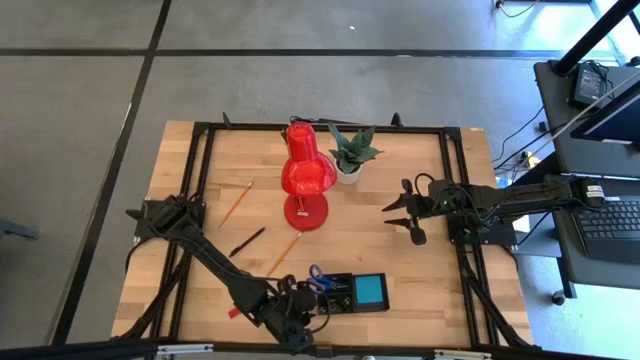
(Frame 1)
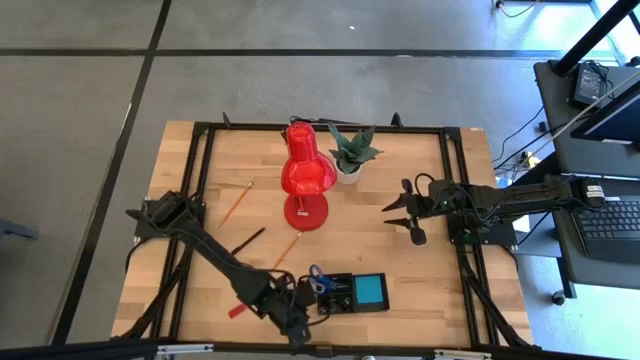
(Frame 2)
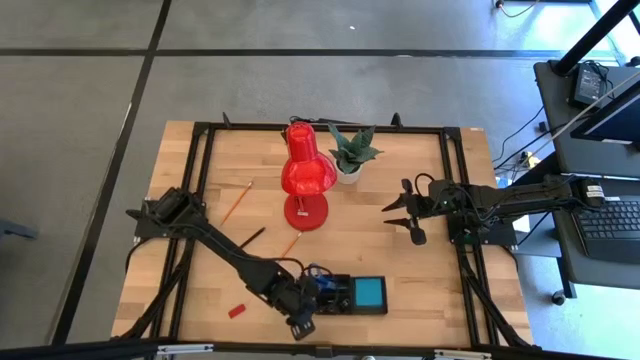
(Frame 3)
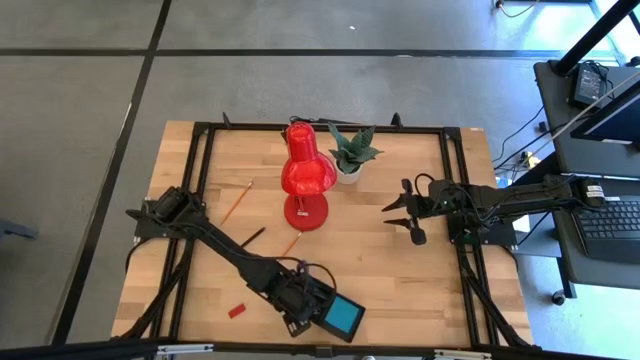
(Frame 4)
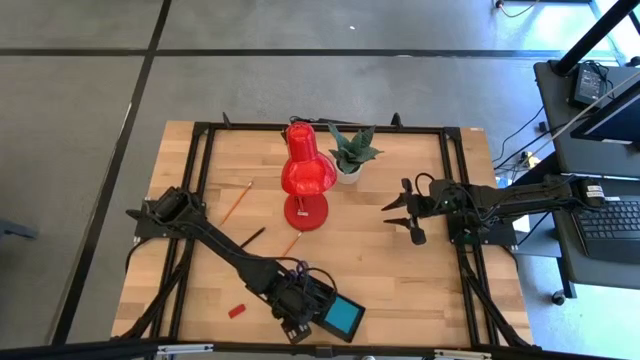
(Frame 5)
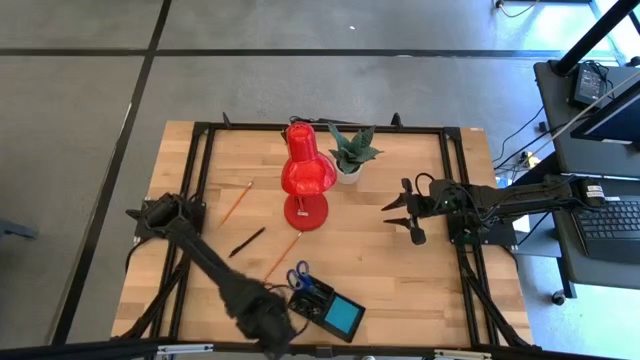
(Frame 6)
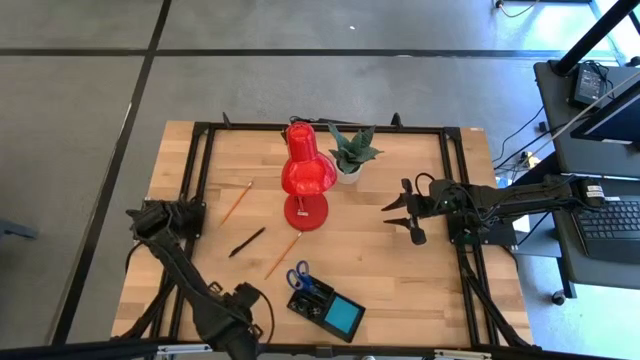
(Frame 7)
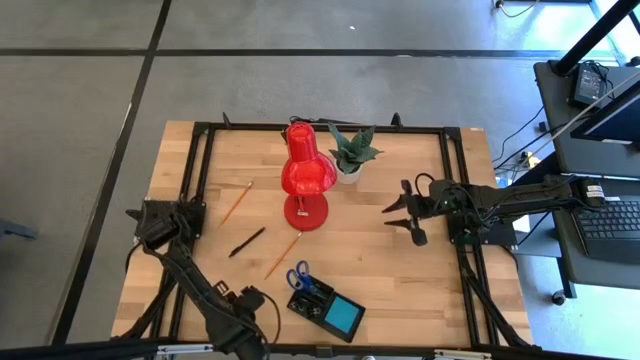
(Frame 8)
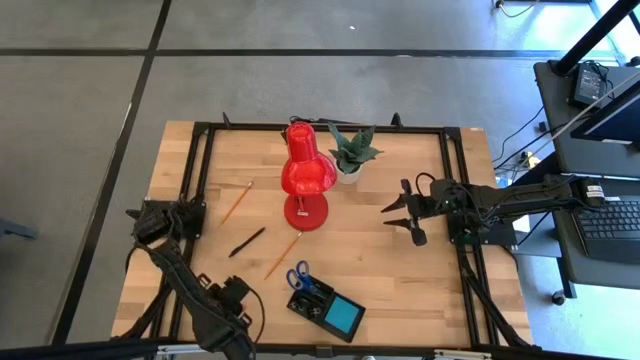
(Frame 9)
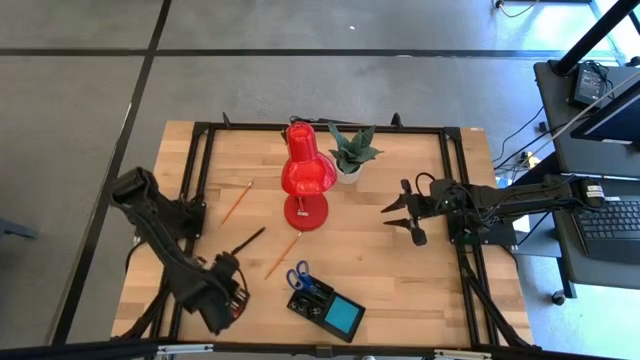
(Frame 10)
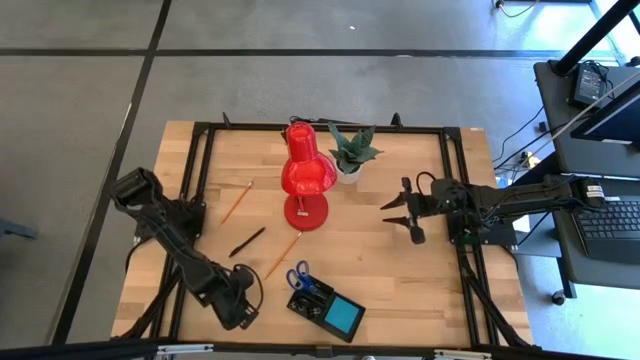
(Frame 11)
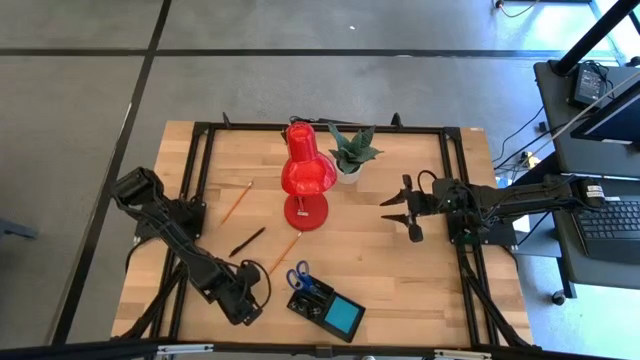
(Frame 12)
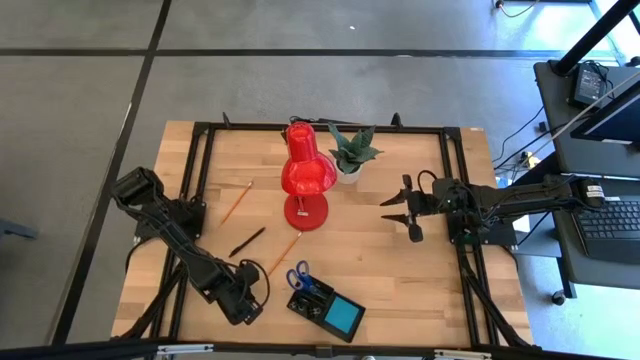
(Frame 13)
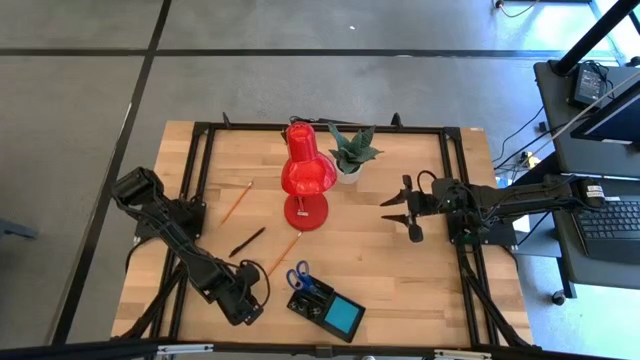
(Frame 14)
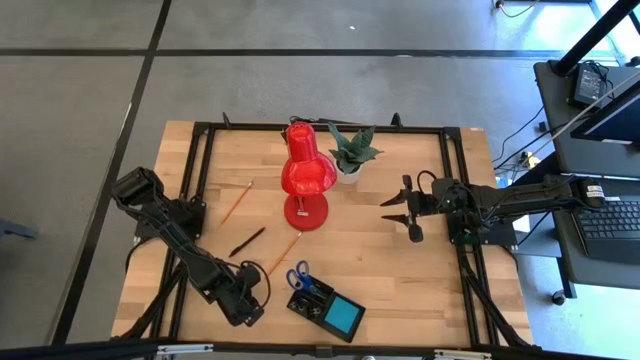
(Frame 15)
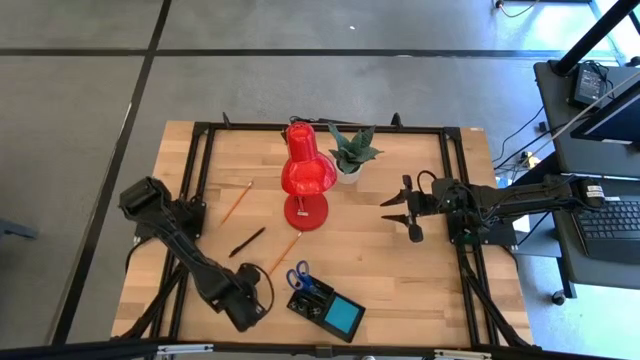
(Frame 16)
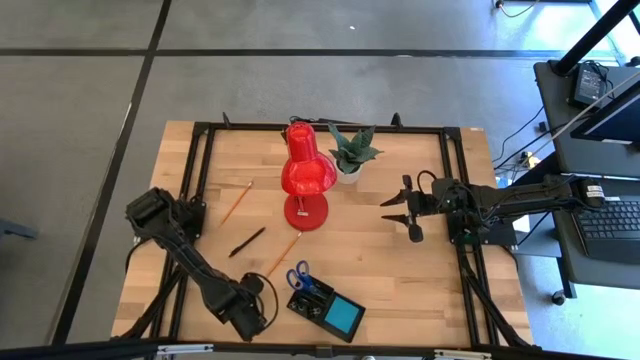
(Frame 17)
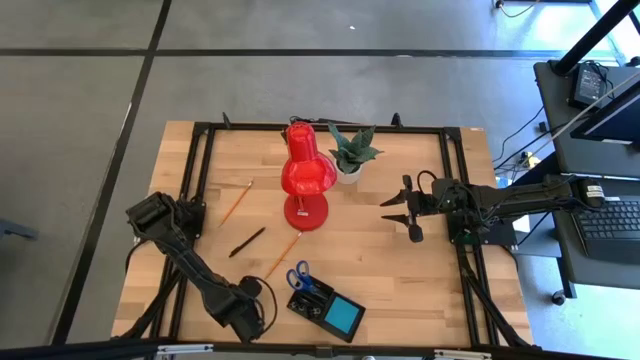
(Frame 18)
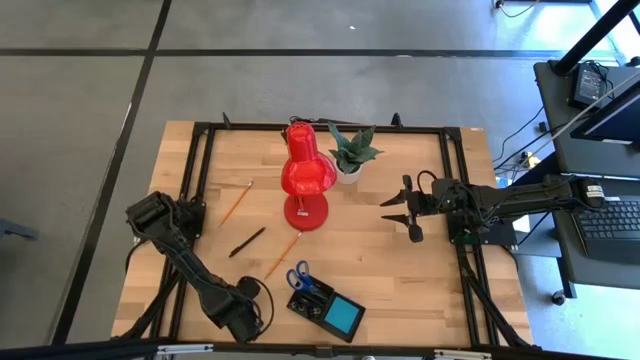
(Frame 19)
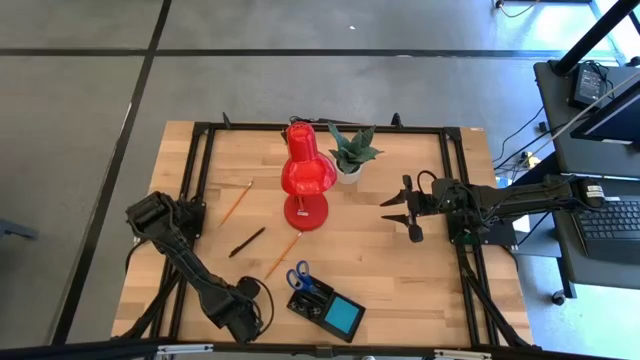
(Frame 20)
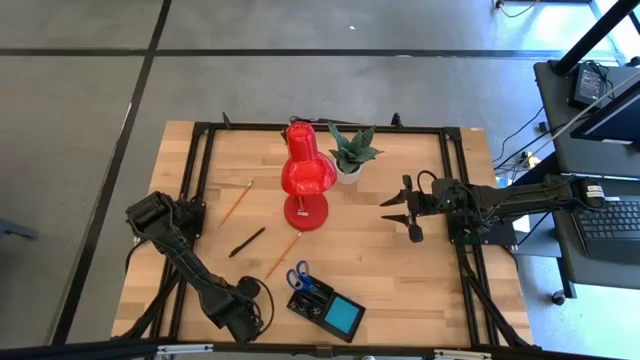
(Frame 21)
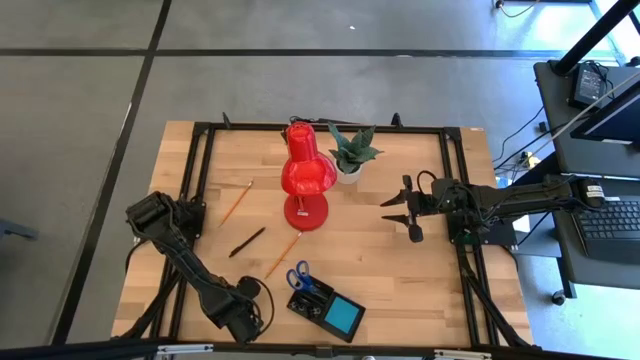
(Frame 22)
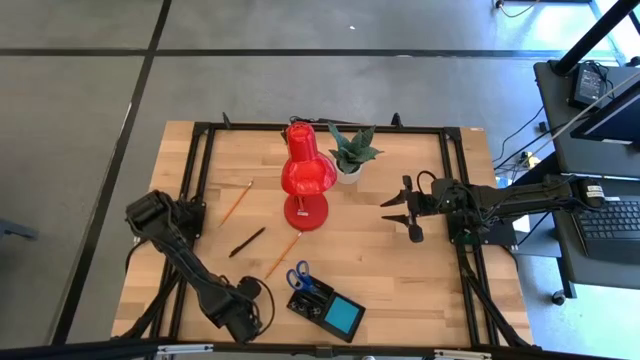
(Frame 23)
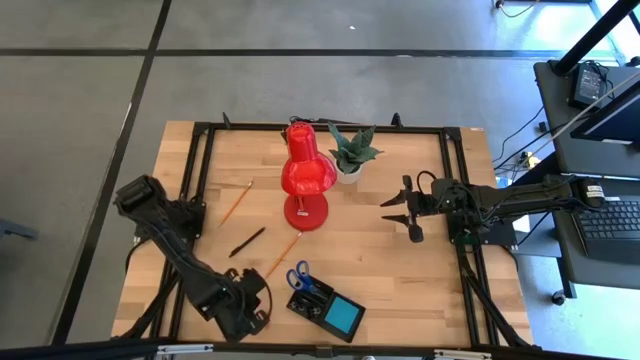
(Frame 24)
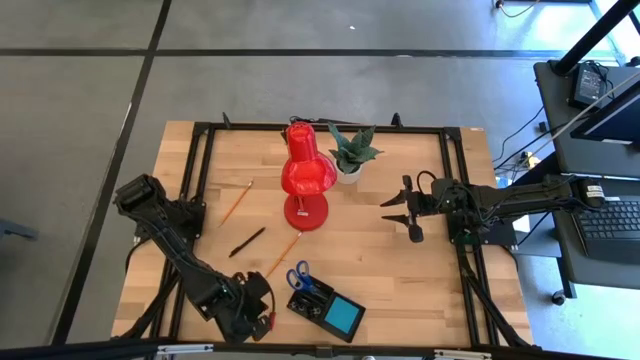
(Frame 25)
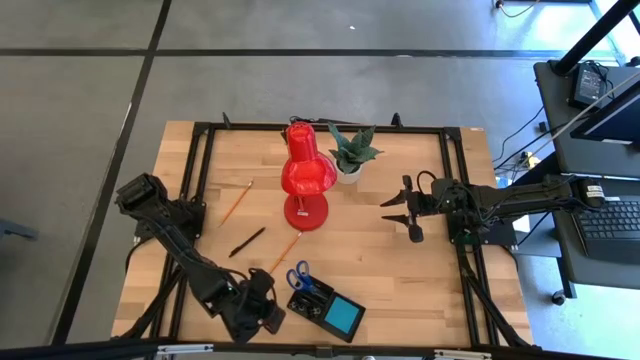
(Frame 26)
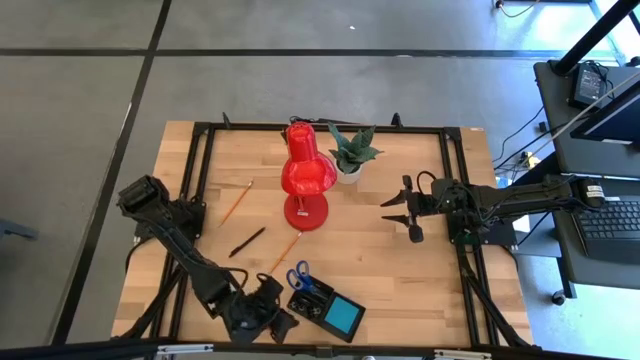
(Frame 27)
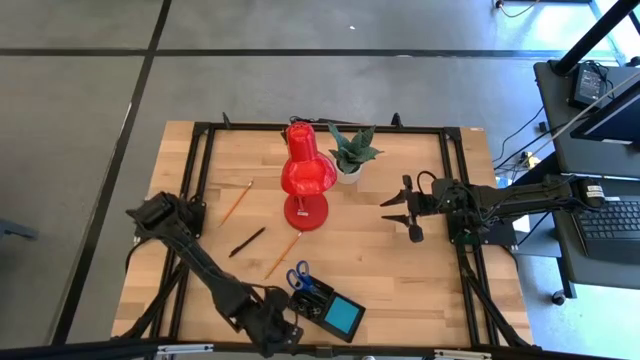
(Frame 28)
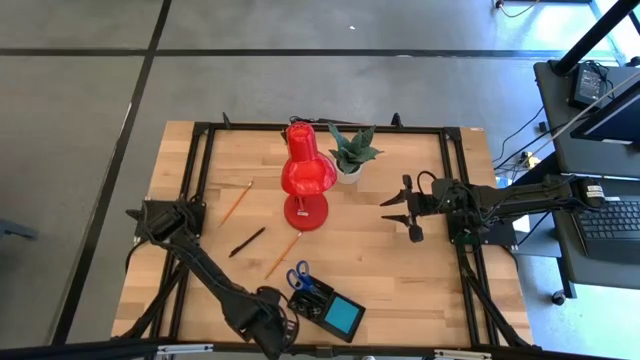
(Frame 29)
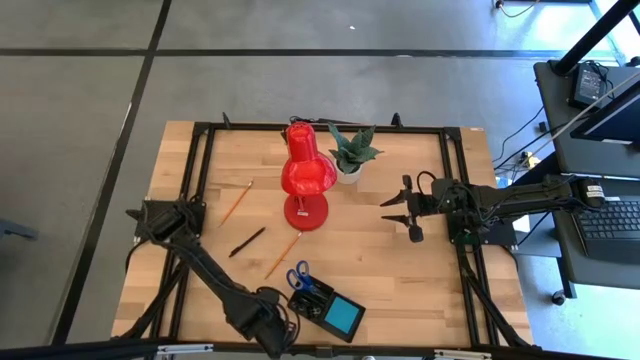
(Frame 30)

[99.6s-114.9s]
Task: Pick and place office supplies into organizer
Put the red eraser into the black desk organizer

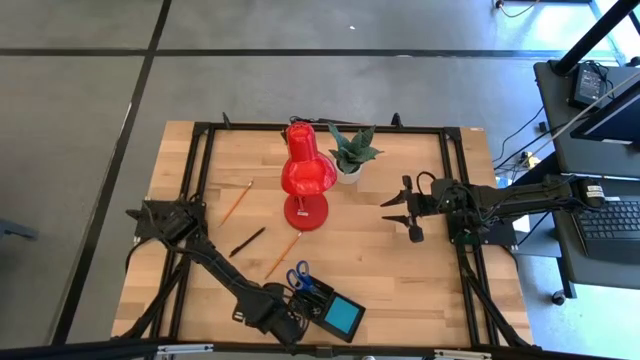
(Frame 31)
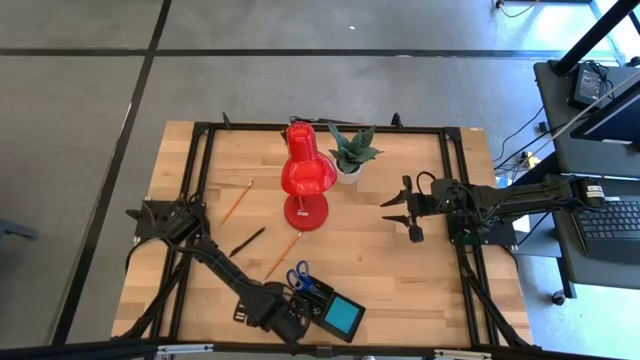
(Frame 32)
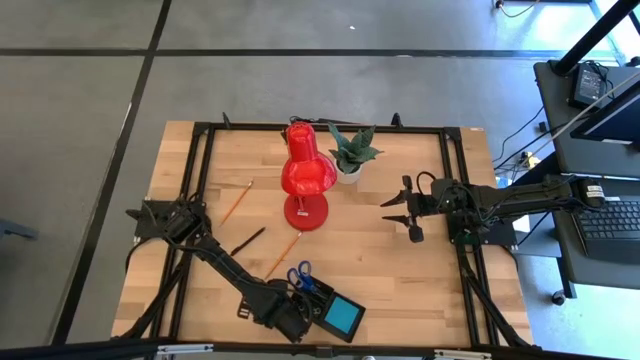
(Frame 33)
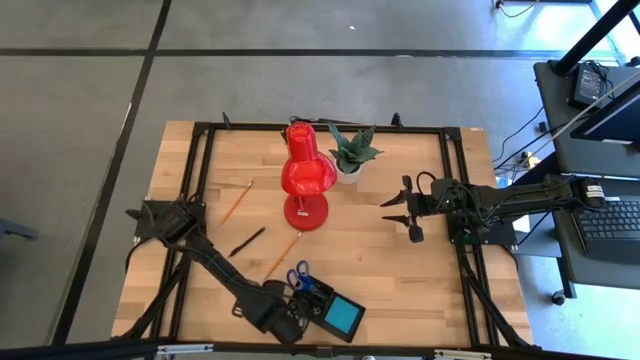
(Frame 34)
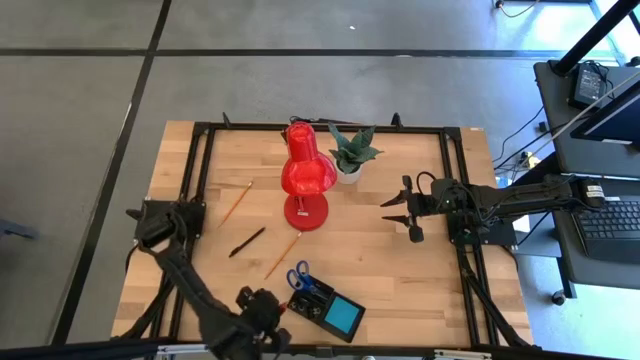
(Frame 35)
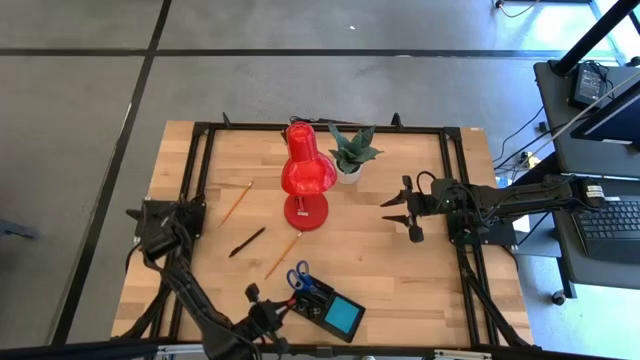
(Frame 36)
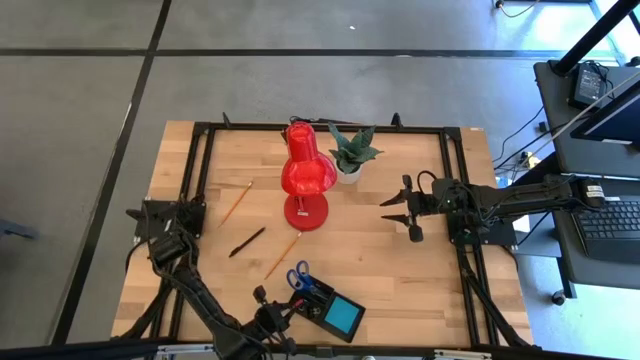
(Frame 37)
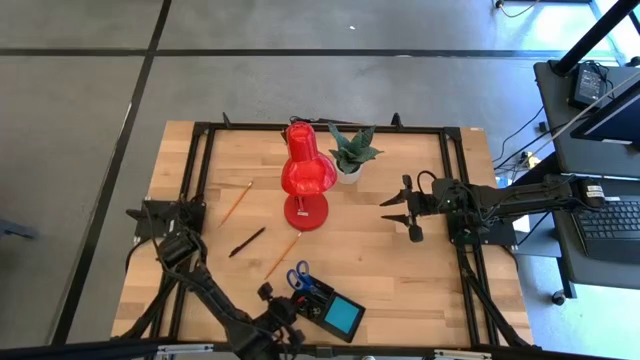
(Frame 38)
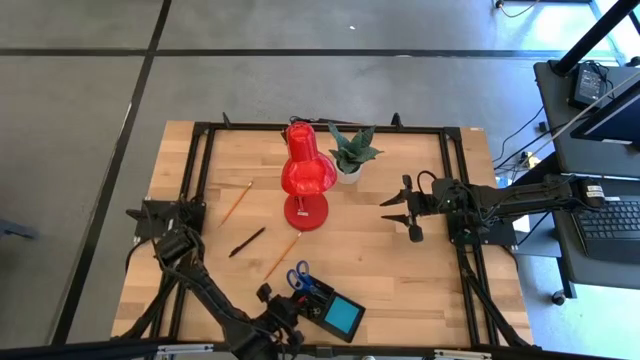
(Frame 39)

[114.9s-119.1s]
Put the red eraser into the black desk organizer

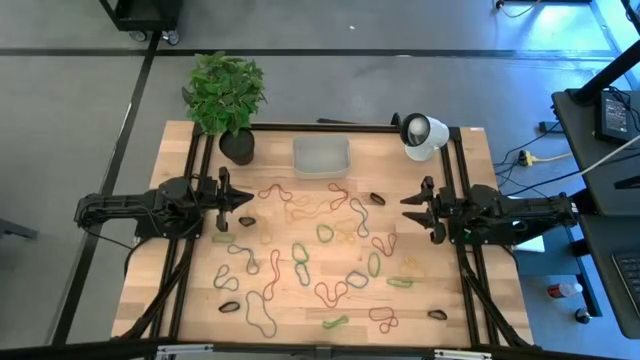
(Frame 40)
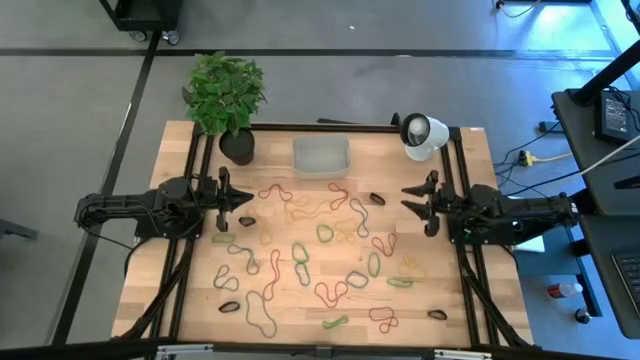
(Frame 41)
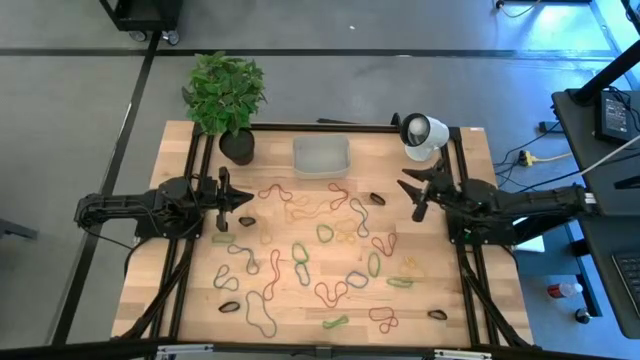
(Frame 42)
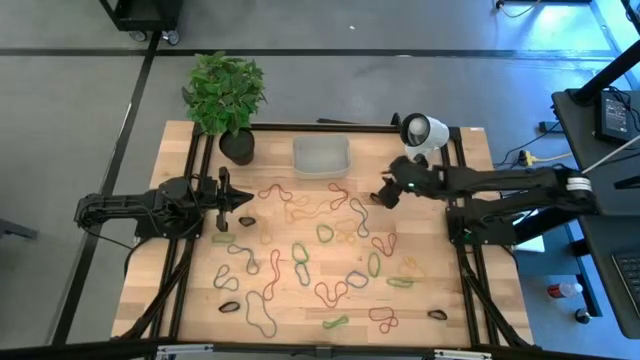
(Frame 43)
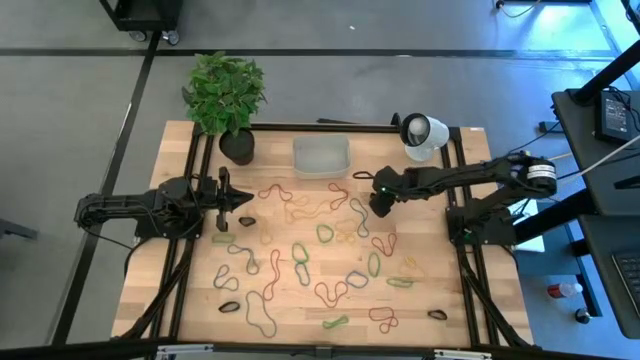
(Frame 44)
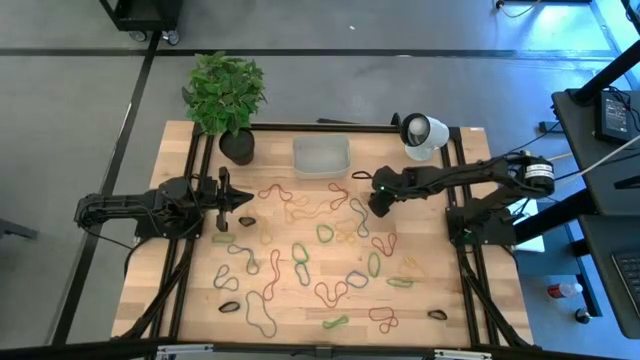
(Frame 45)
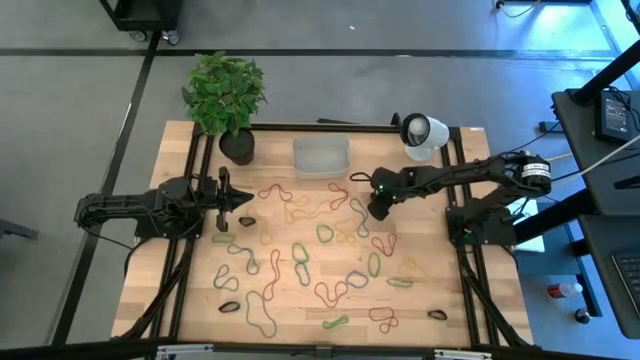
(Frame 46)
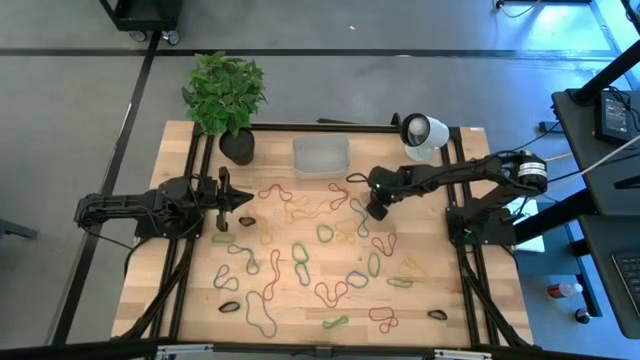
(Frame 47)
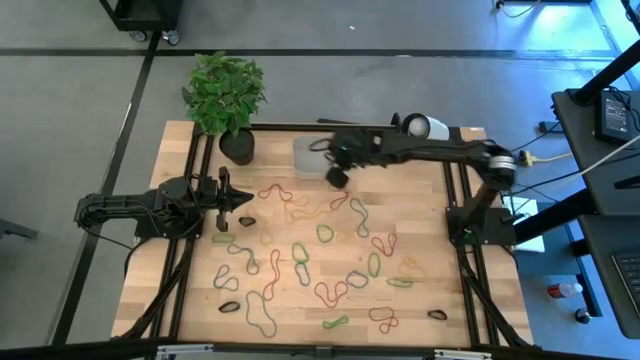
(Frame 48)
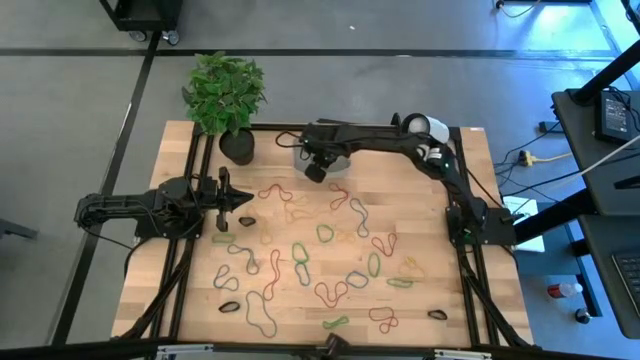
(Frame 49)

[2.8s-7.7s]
Task: Pick and place rubber bands into bin
Put the black rubber band into the gray bin
